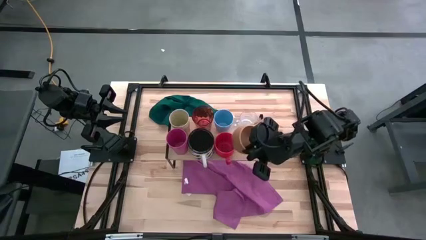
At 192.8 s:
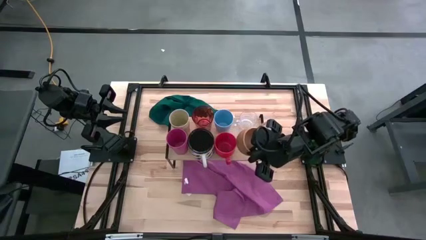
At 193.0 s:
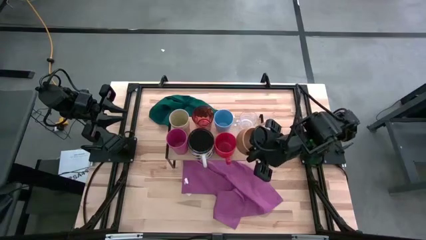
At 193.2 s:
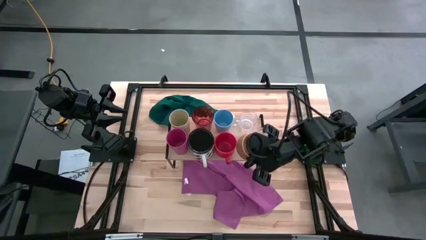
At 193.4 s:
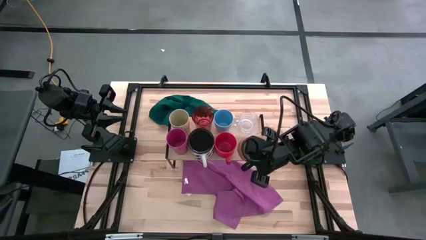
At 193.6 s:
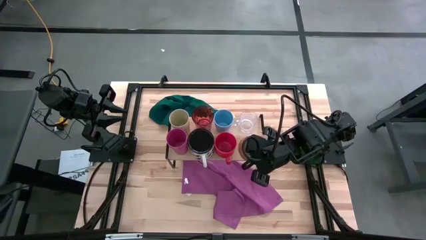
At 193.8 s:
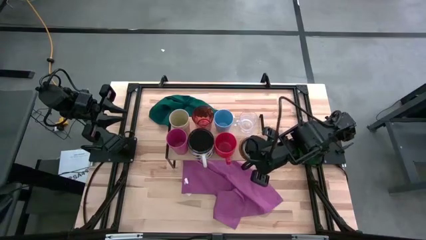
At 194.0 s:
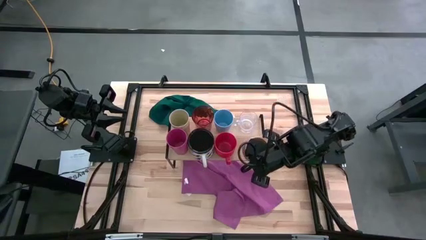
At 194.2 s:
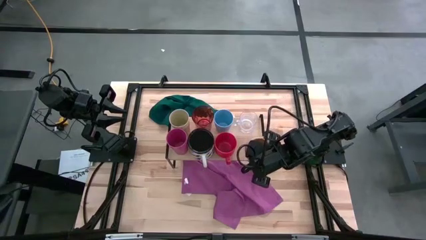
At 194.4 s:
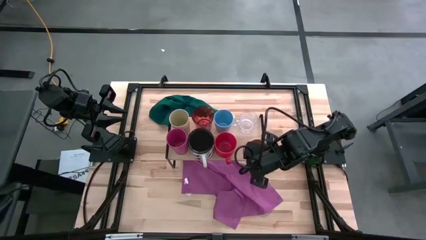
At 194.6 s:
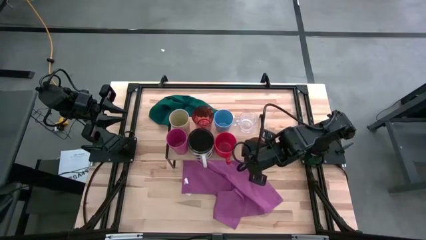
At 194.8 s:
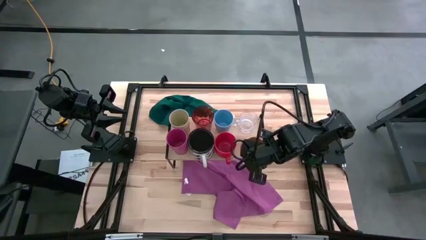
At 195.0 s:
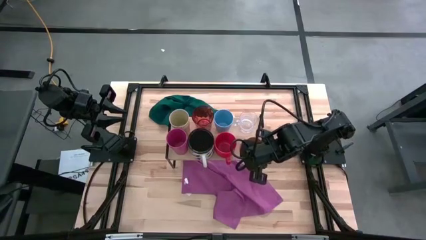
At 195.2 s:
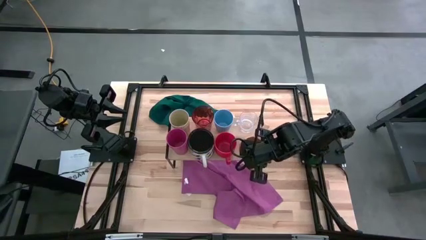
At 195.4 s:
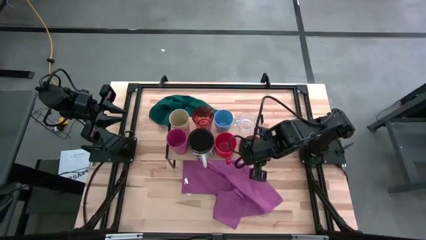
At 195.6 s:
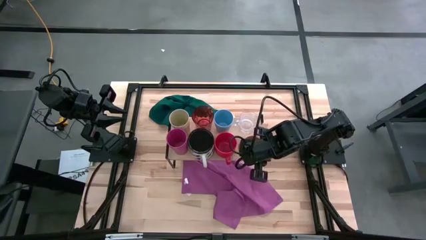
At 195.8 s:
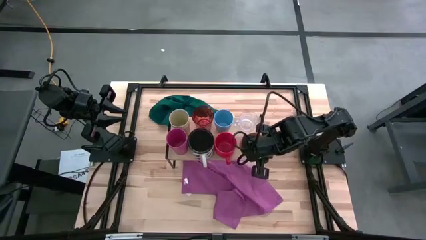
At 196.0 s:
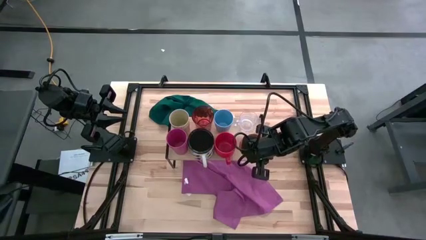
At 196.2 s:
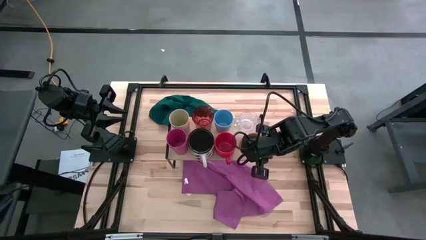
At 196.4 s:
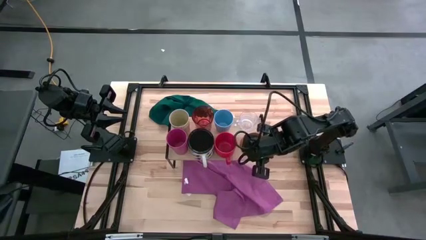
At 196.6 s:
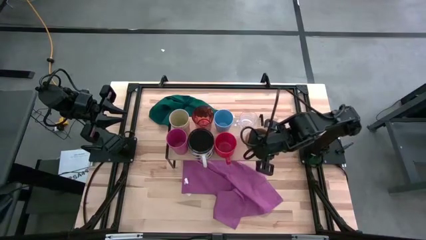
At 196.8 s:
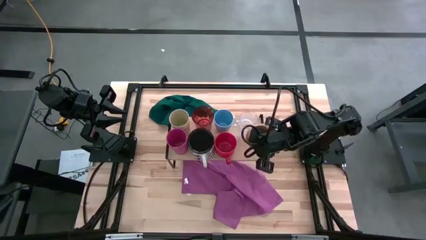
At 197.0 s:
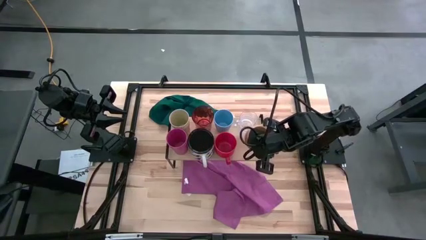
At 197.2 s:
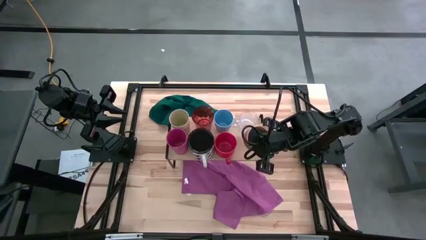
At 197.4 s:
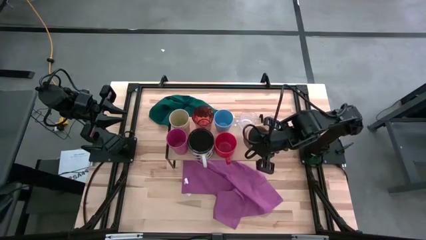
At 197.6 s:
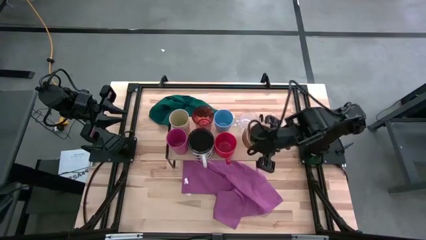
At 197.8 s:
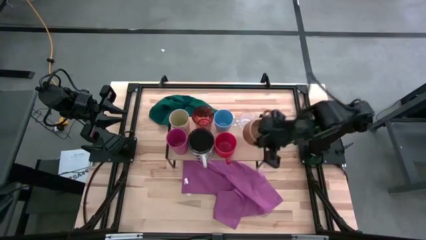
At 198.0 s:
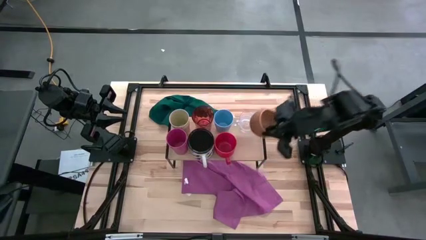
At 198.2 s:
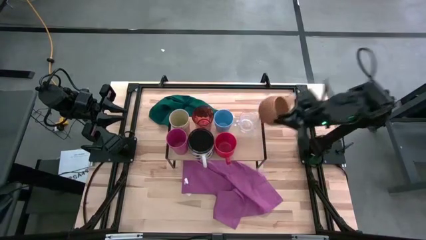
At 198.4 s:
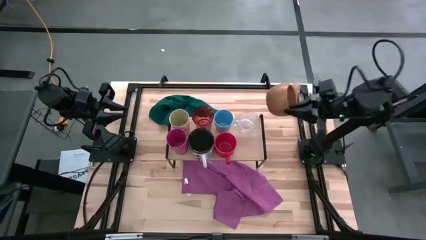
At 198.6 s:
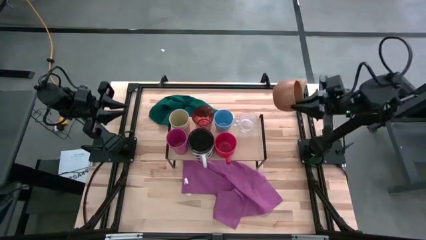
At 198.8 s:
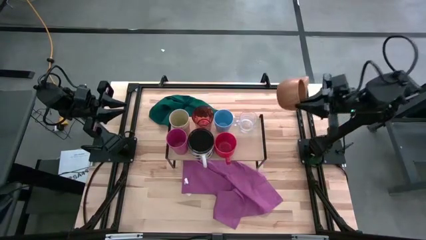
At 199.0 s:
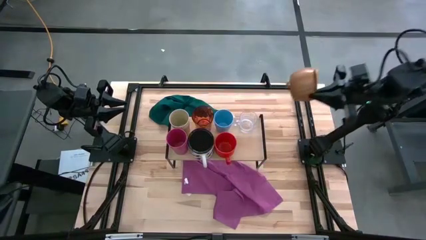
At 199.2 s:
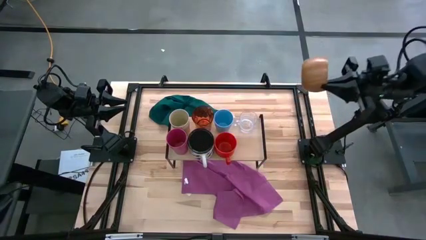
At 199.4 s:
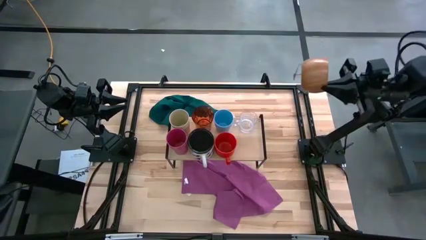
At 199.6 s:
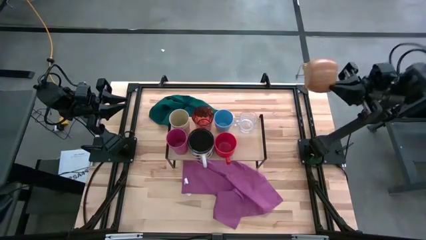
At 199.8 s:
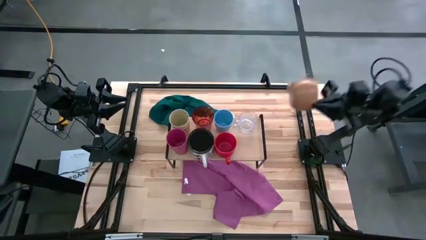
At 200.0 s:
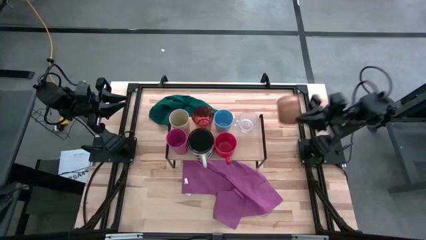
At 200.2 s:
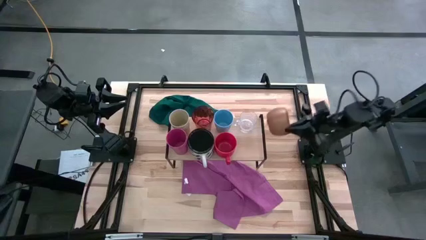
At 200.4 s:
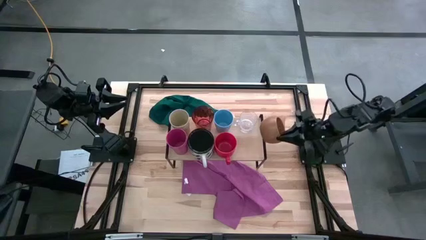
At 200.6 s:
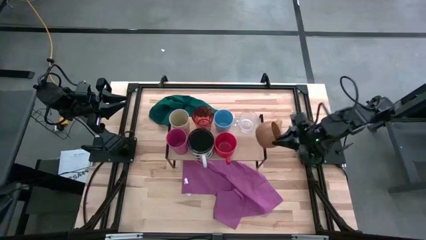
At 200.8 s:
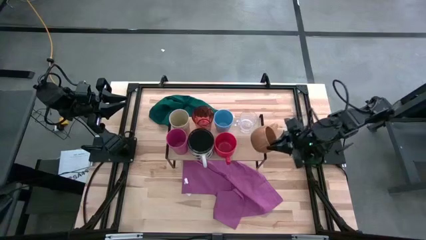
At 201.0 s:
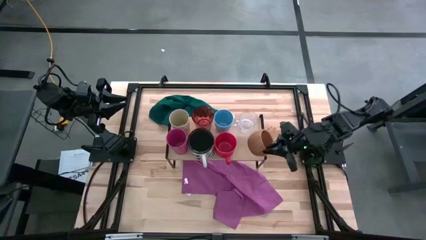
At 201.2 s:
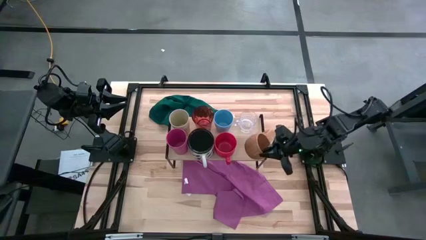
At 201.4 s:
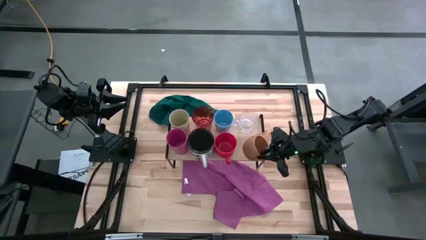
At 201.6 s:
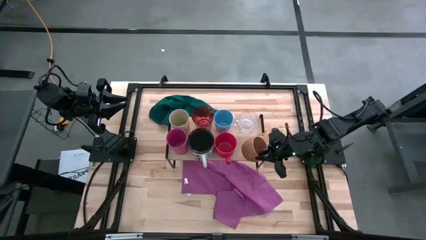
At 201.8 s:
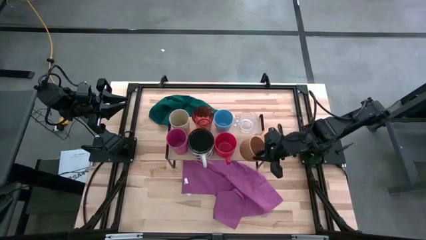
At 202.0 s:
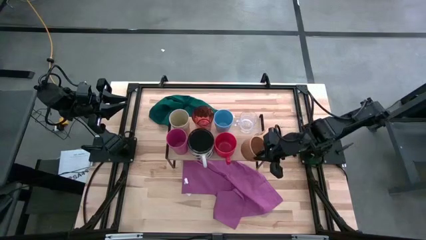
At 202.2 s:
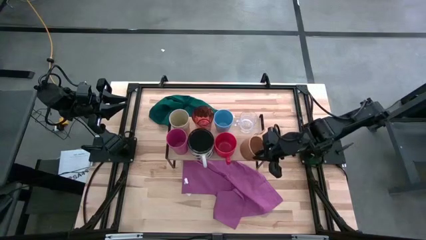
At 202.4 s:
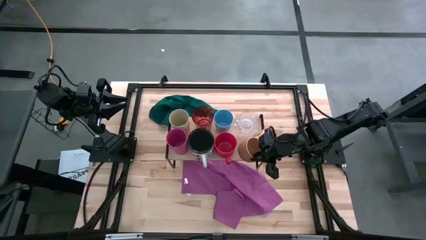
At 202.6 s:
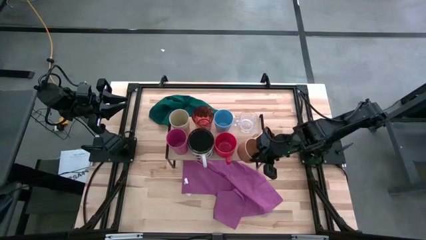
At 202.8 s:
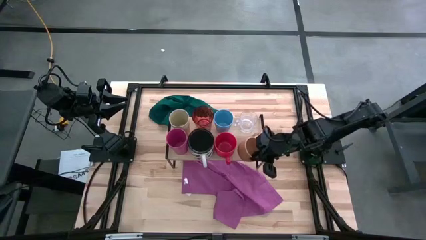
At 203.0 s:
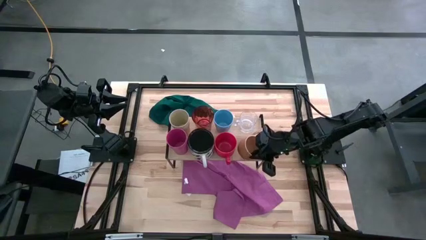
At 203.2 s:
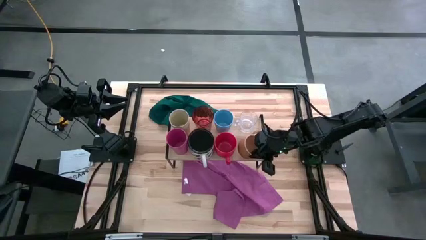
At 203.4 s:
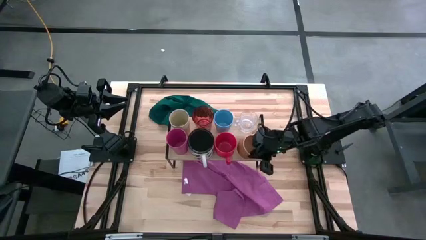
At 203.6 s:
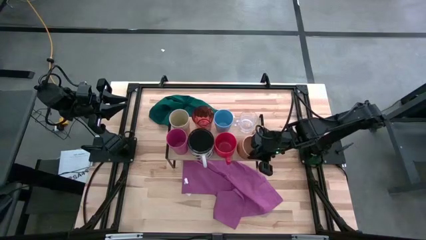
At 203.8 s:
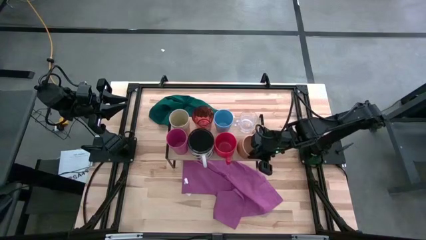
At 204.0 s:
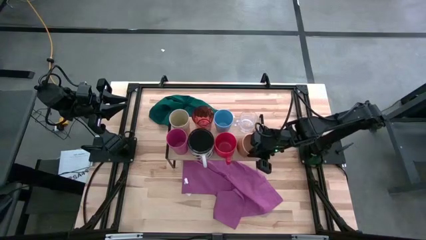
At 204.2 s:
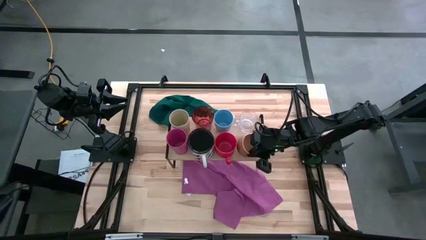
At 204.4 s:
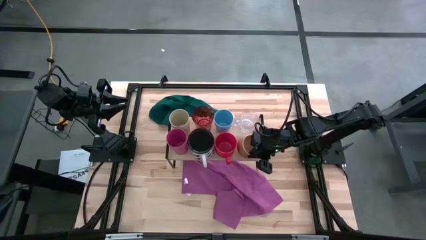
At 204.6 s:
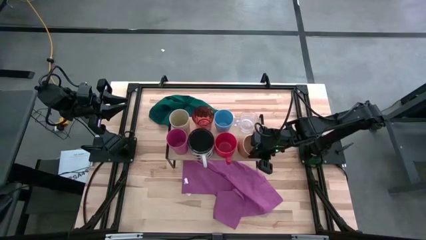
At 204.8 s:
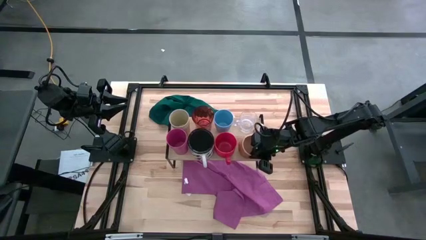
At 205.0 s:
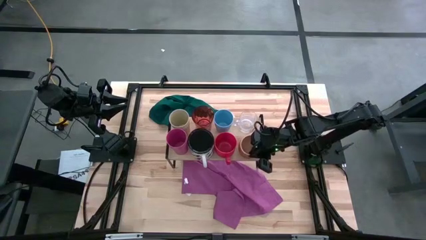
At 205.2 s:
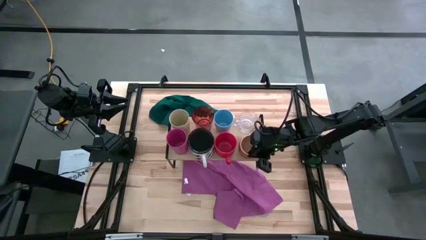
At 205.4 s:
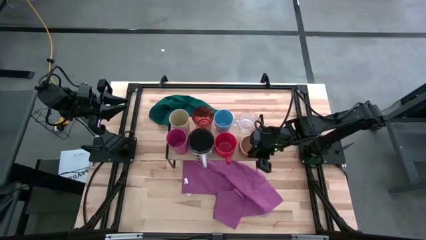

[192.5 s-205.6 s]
Task: Stack small to large cups/mugs on shelf
Put the brown mug on the shelf

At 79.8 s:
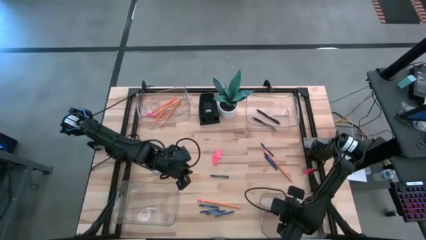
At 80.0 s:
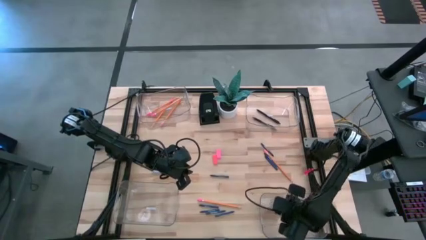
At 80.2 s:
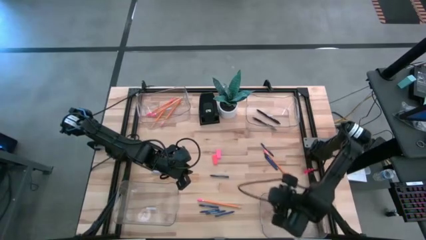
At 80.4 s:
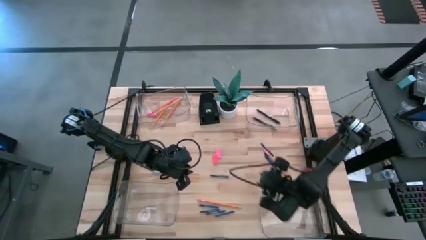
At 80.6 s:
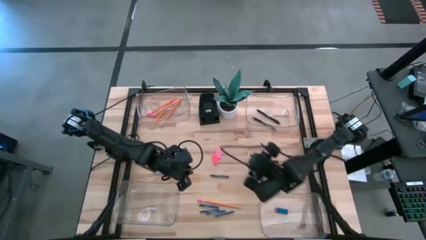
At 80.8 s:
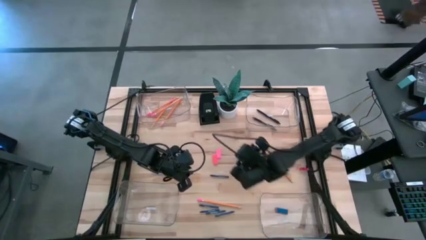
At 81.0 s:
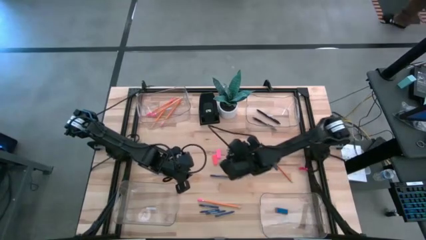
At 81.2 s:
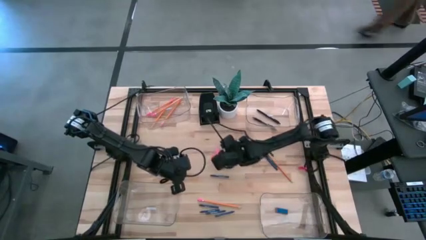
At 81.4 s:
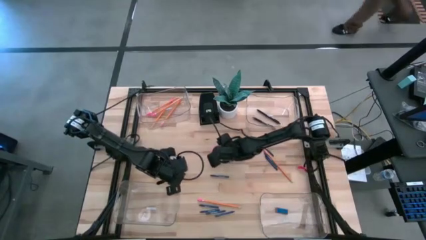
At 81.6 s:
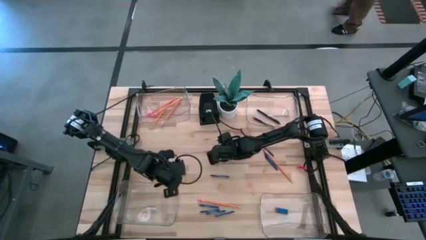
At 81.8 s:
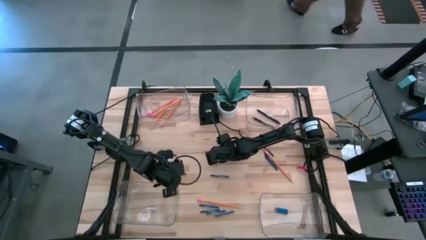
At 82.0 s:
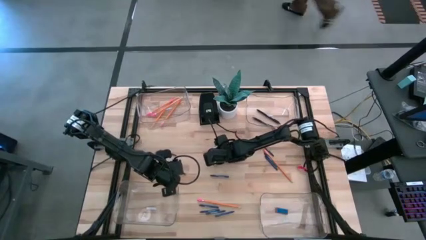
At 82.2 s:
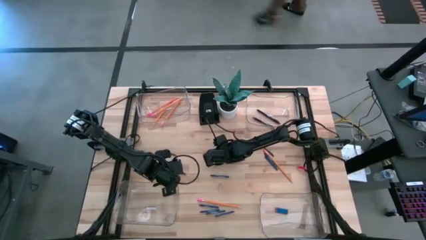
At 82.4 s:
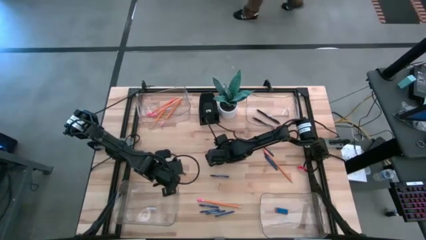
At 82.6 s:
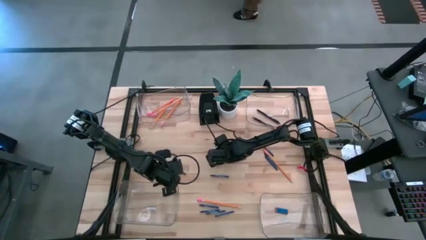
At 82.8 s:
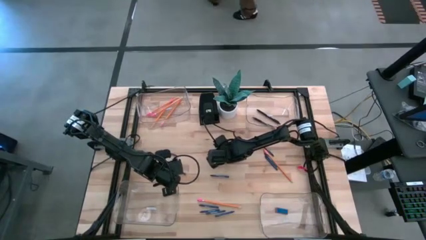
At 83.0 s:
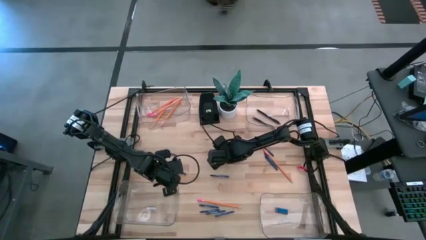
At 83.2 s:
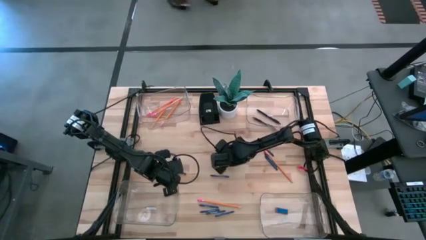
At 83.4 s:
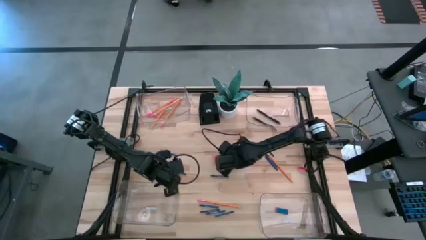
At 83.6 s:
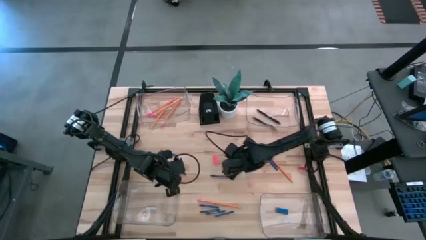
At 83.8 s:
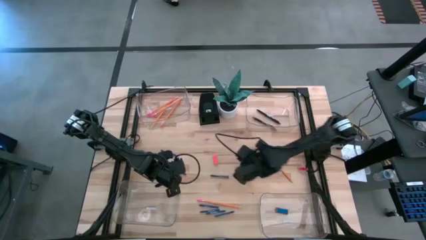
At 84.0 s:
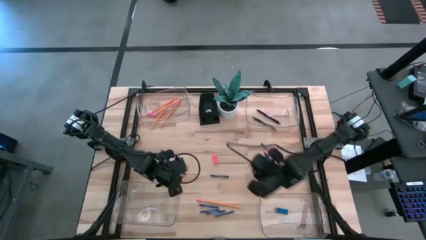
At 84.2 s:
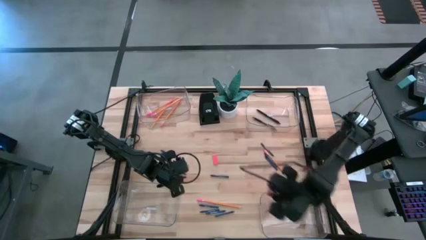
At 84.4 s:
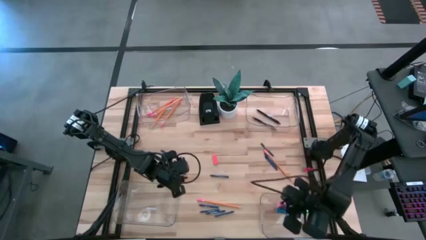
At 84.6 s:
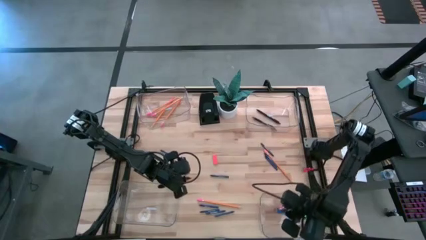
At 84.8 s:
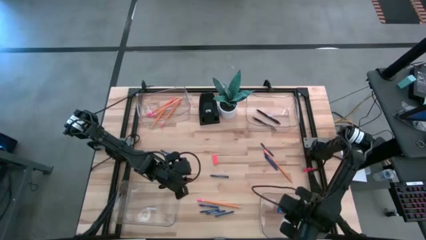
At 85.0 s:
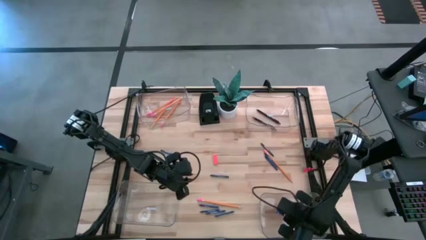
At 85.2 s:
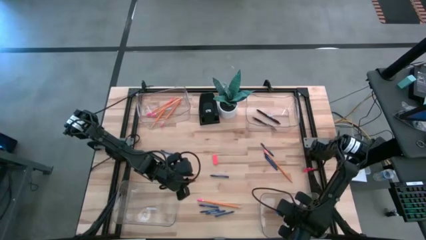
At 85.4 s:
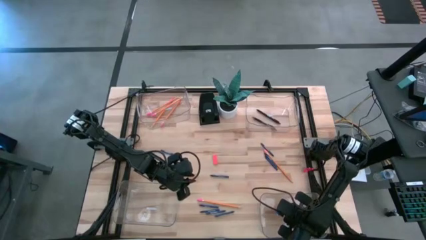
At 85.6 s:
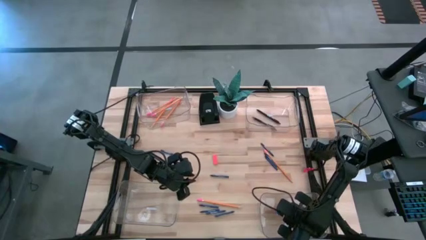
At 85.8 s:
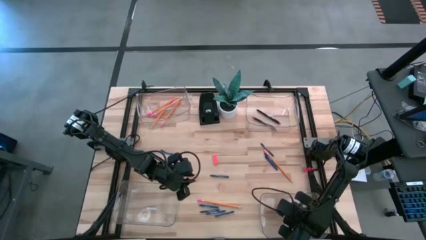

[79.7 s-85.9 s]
Task: Sort crayons/erasers/pens/pencils in bins
Put the pink eraser into the bottom right transparent bin
